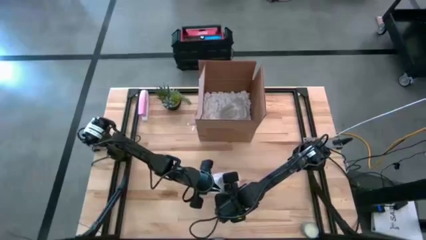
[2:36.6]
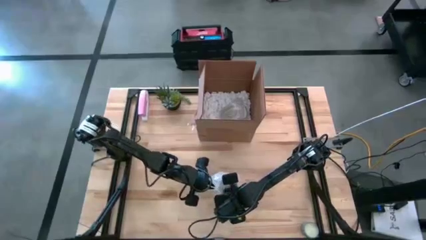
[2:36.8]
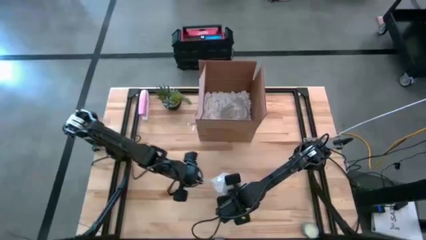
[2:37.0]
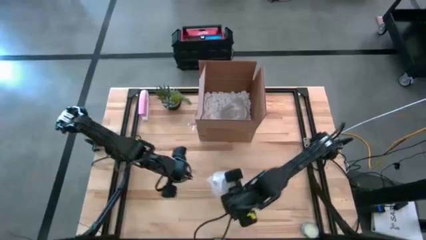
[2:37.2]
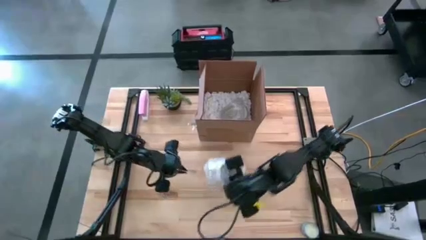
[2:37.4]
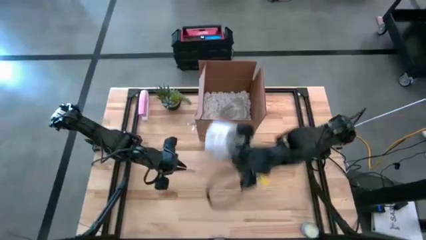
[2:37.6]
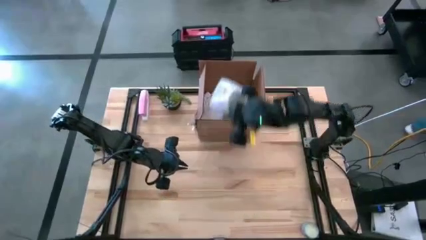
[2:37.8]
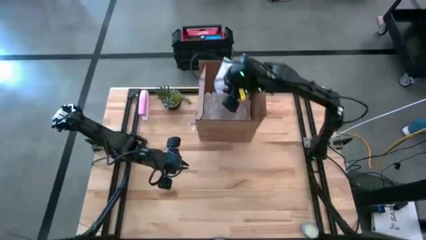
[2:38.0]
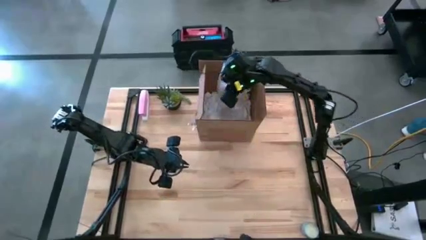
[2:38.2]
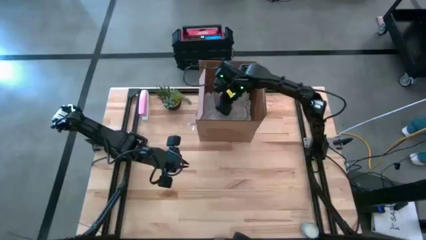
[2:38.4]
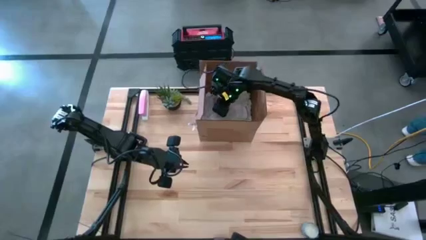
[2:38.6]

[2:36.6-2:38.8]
Task: wrap mug
Put the wrapped orange mug into the cardboard box

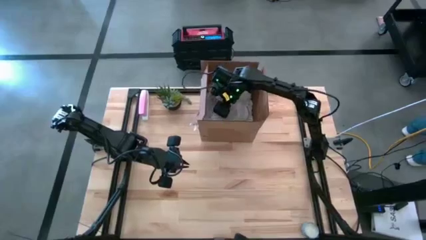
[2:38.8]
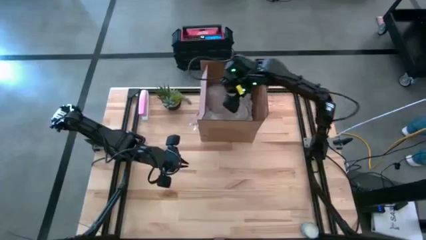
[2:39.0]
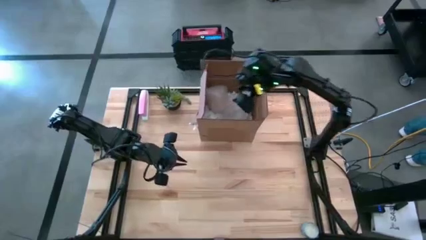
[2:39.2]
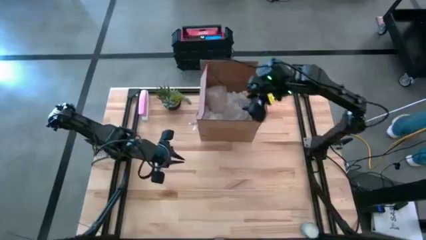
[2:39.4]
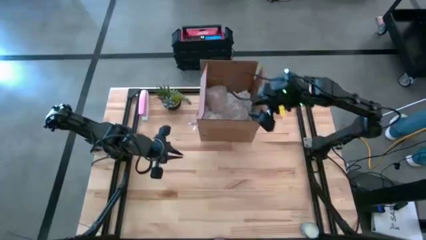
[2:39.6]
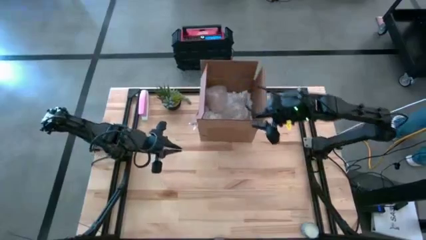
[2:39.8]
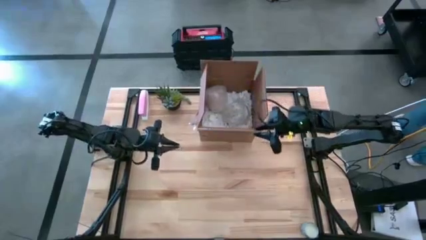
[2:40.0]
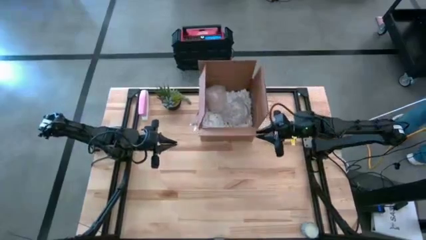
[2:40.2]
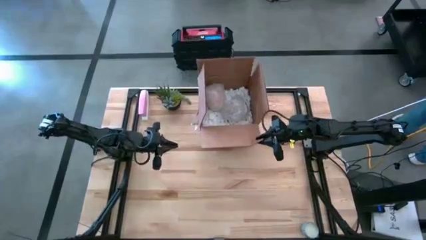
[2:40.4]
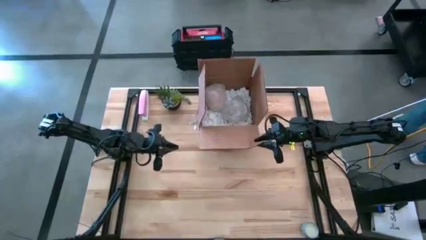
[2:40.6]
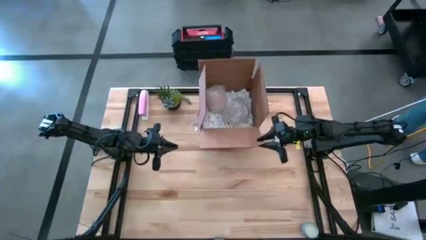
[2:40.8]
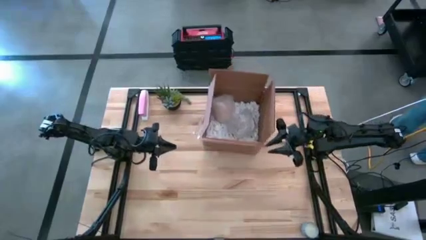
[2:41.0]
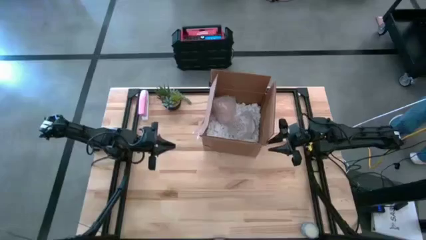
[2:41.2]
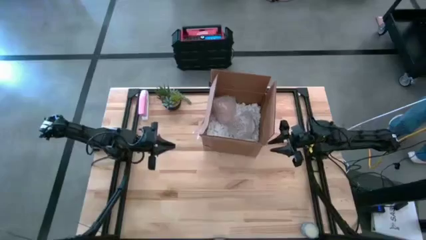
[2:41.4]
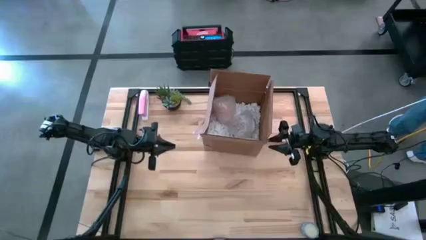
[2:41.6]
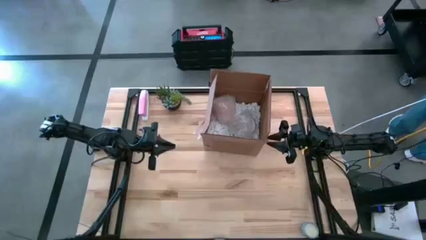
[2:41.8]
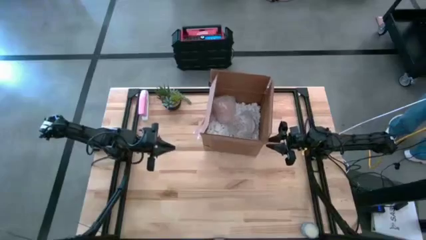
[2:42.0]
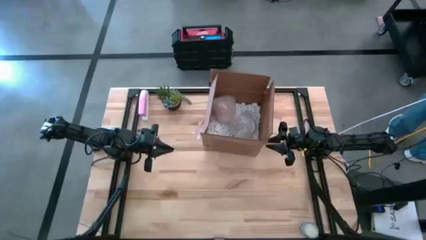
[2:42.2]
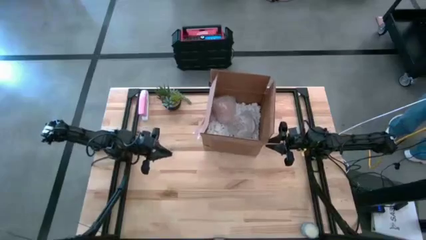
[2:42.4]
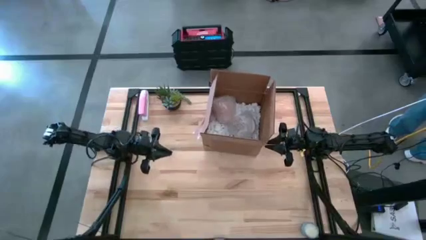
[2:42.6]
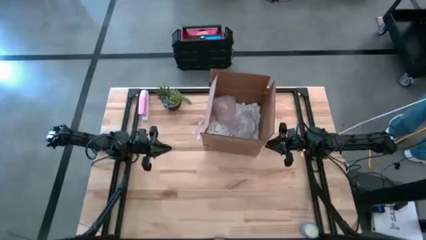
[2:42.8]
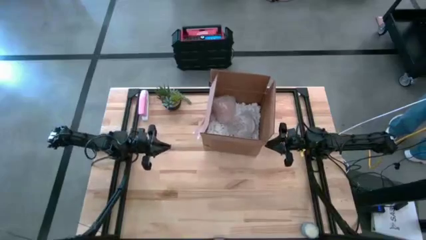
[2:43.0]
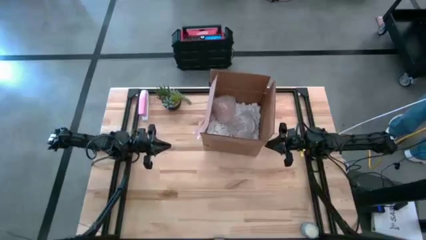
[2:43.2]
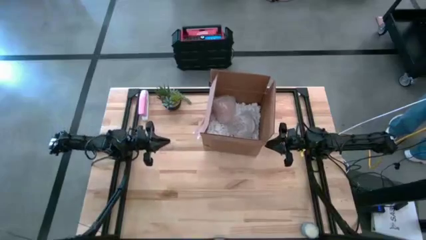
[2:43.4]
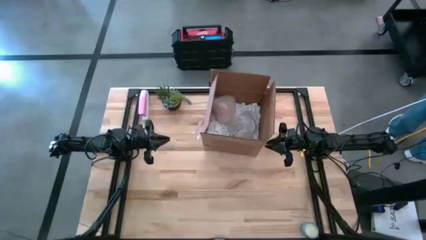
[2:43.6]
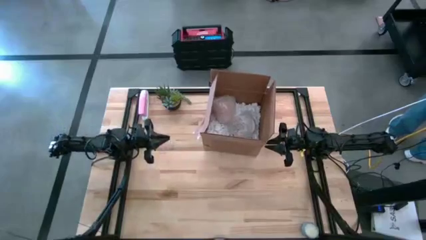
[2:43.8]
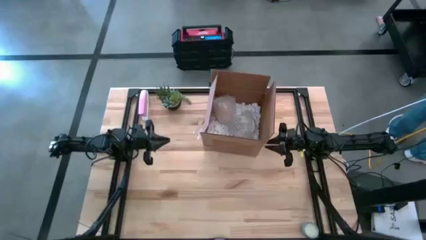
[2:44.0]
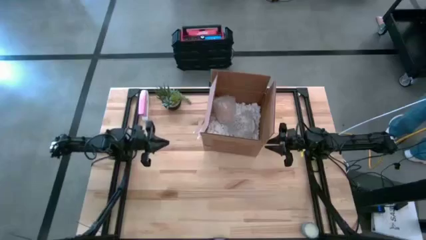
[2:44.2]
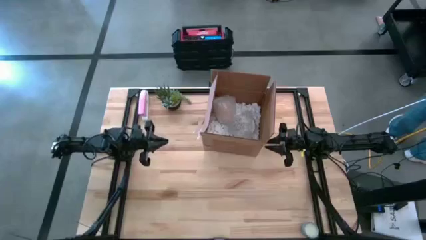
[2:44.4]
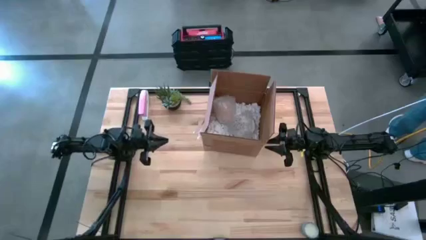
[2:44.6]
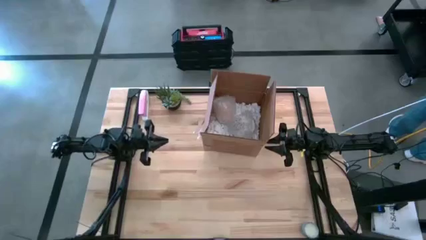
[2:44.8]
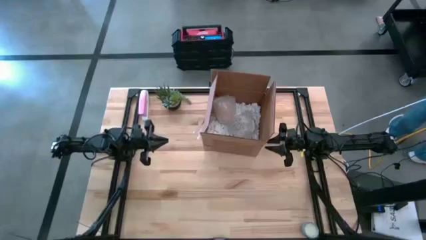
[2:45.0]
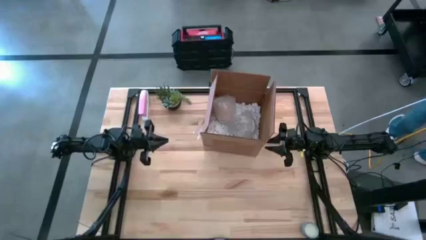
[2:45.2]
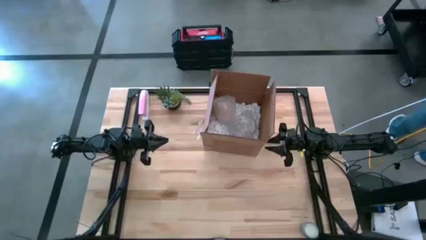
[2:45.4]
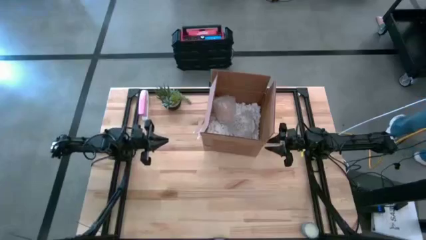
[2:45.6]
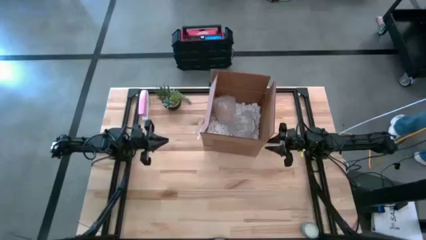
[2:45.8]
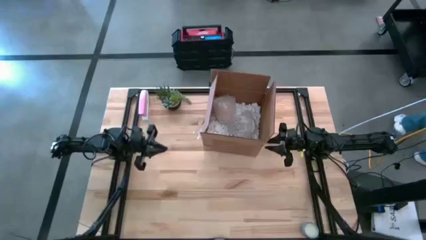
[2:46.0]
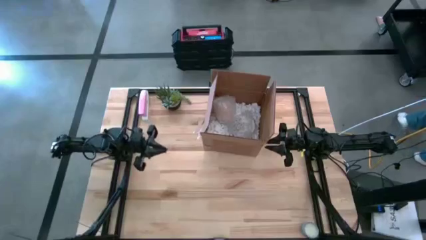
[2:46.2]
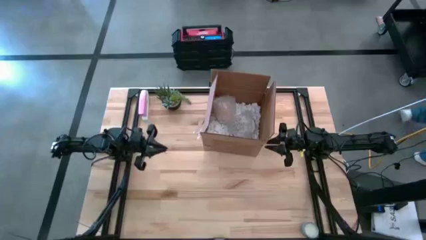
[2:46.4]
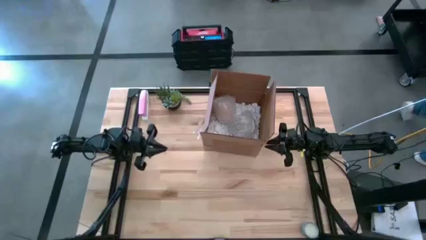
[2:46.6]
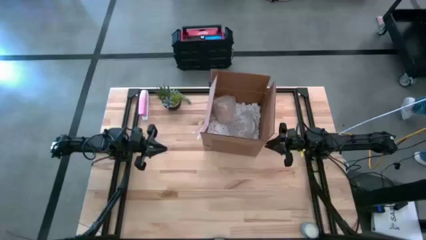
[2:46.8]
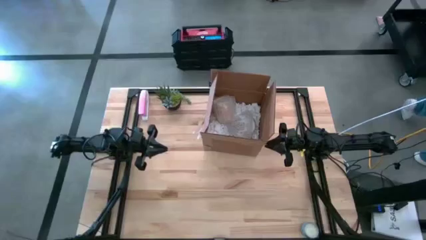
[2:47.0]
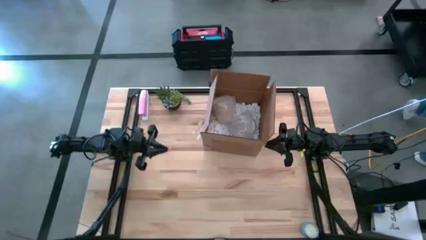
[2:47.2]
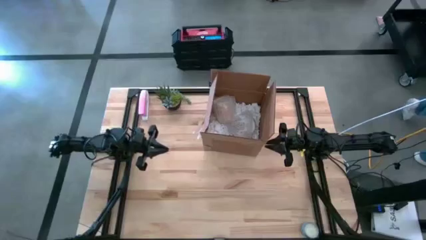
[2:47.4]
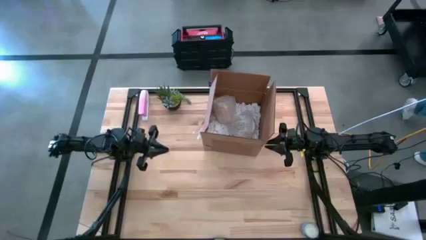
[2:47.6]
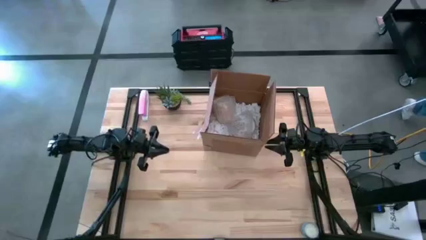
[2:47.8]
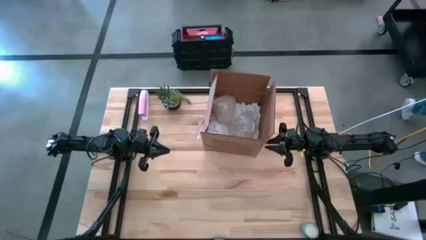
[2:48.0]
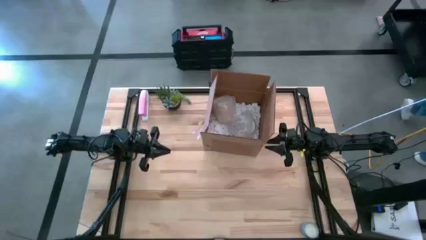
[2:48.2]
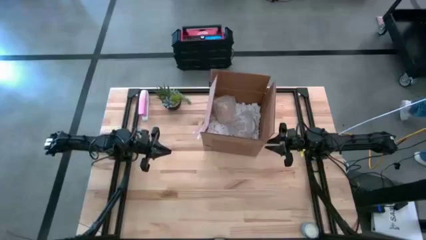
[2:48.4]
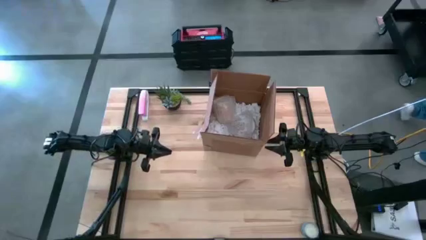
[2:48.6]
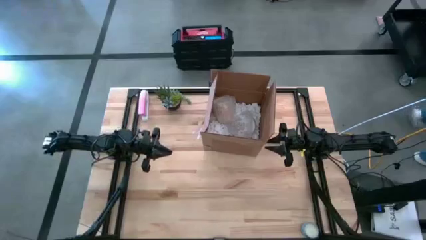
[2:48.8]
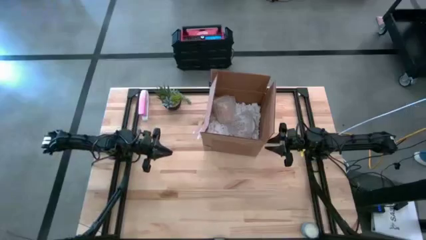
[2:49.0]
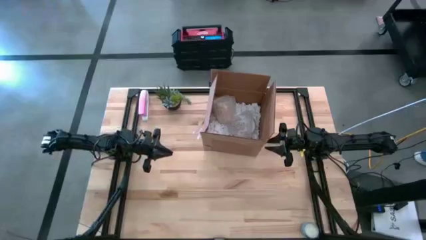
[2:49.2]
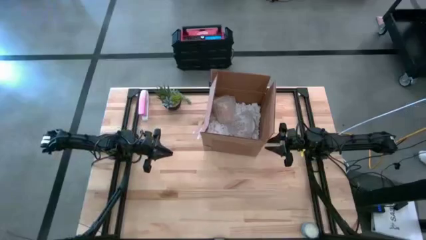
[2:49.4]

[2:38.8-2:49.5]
Return to Home Position

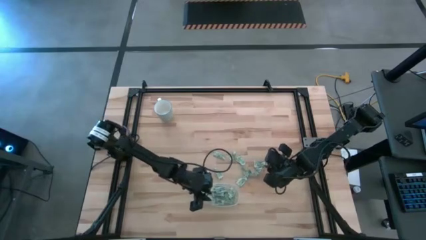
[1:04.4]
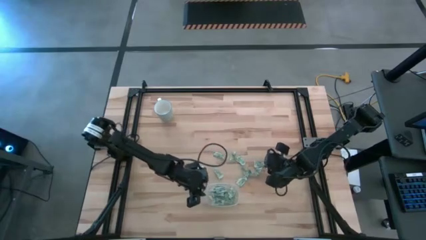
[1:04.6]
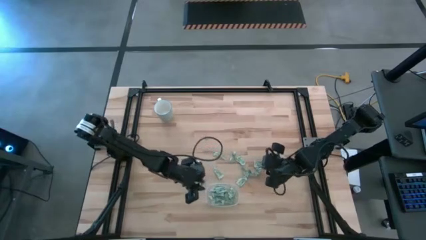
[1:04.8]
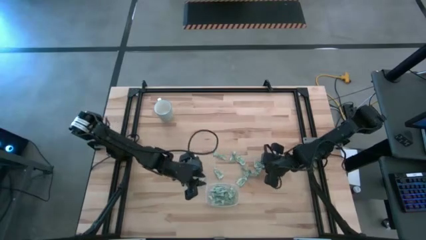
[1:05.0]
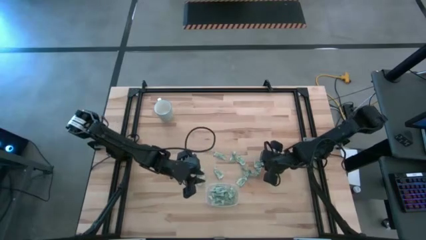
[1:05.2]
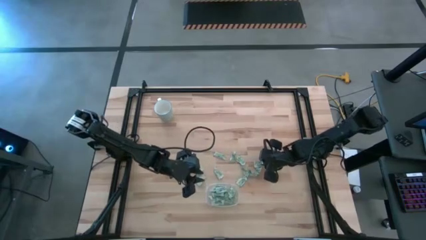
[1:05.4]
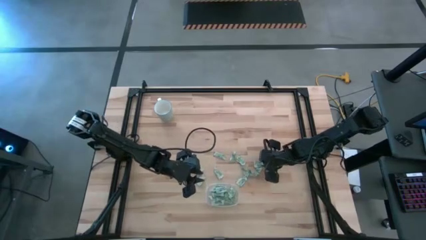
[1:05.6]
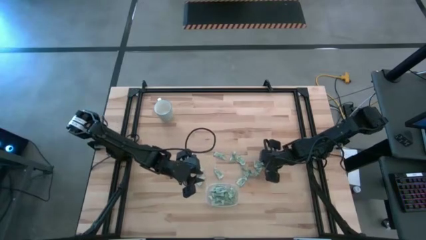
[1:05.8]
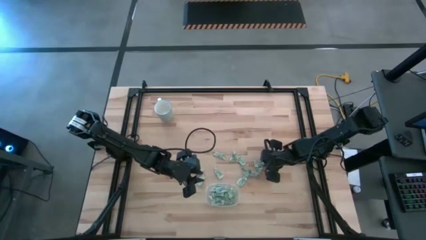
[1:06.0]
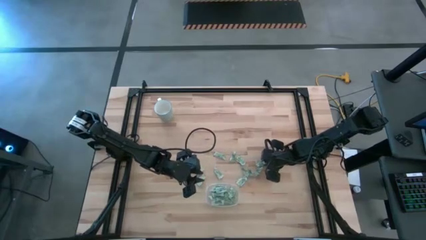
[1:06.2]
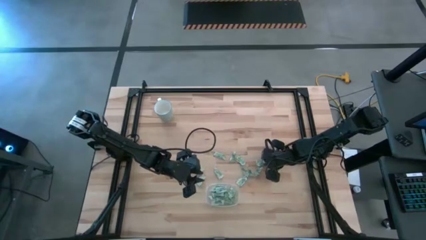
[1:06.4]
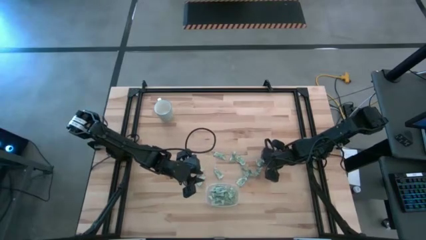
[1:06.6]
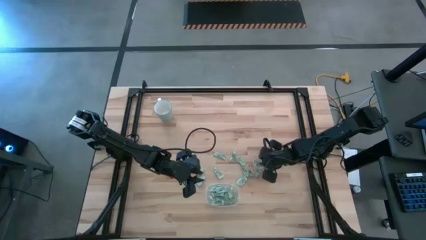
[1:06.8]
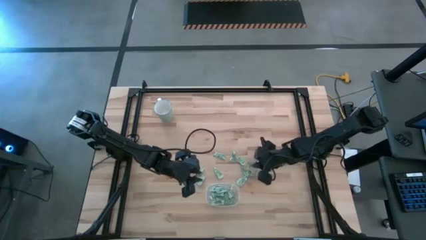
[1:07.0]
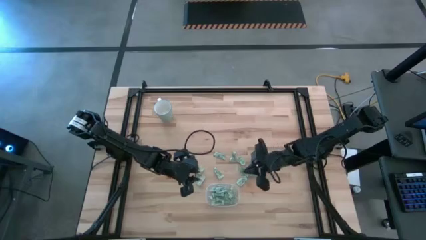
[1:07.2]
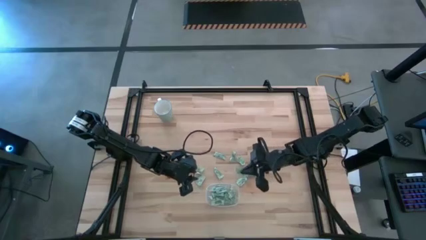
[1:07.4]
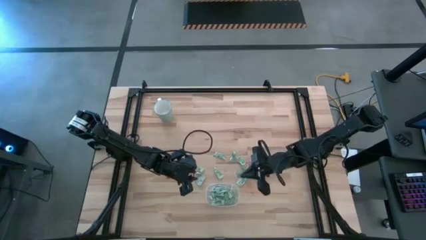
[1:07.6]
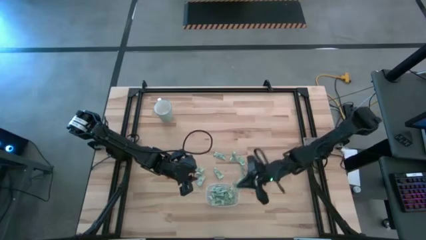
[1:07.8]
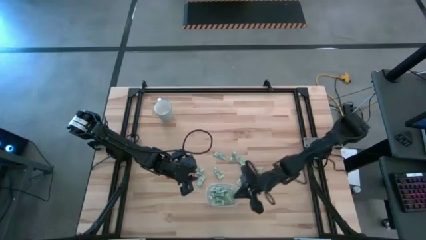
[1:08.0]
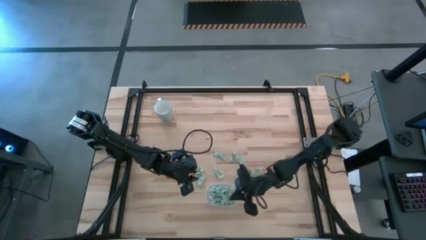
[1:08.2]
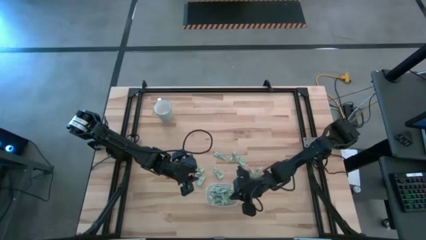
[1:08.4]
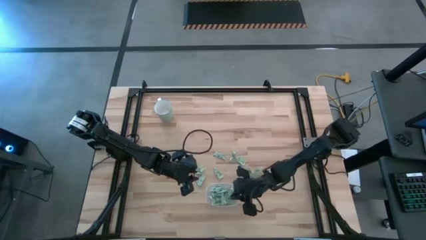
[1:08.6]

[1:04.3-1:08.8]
Task: Pick and place Stevia / Truvia into bins
Put the stevia packet into the transparent container
